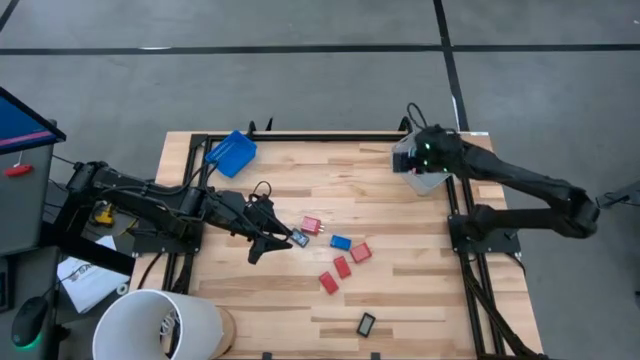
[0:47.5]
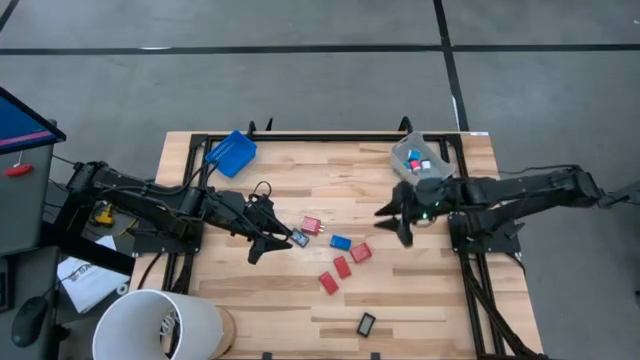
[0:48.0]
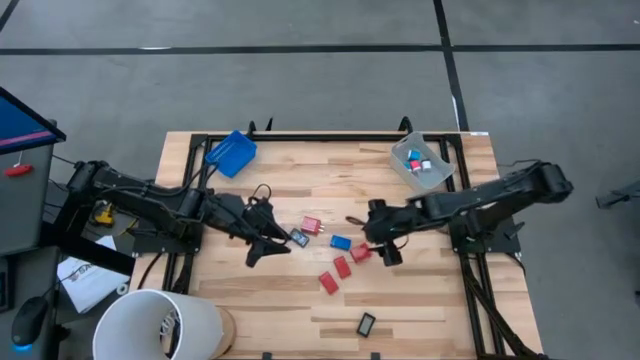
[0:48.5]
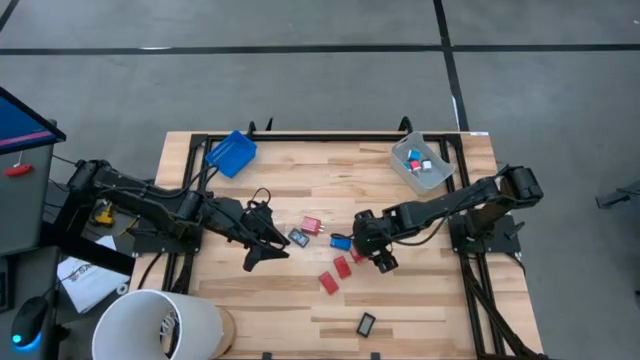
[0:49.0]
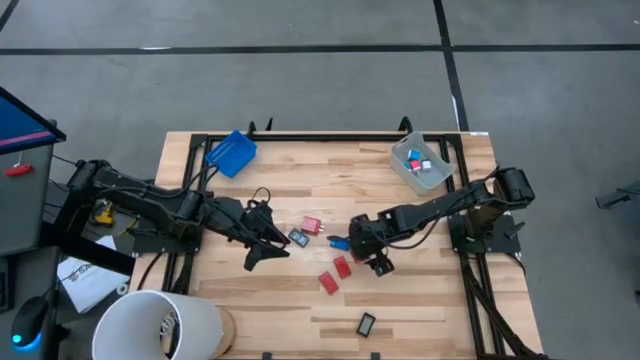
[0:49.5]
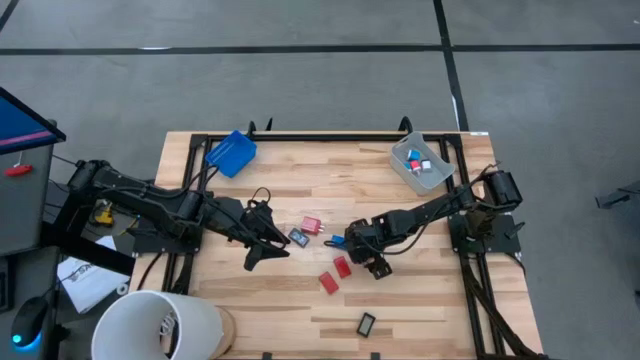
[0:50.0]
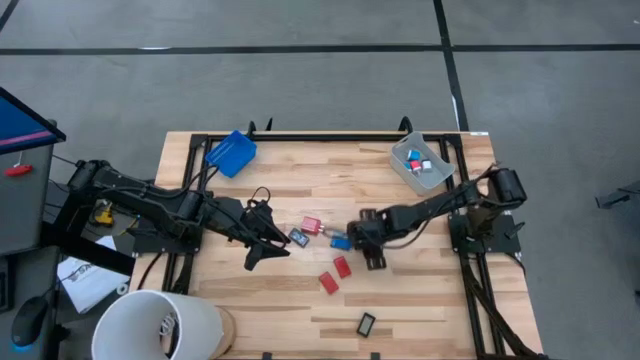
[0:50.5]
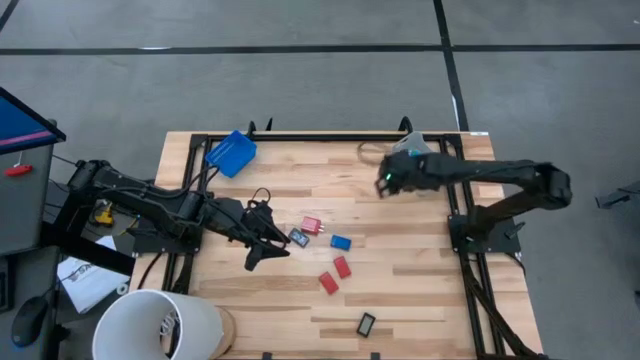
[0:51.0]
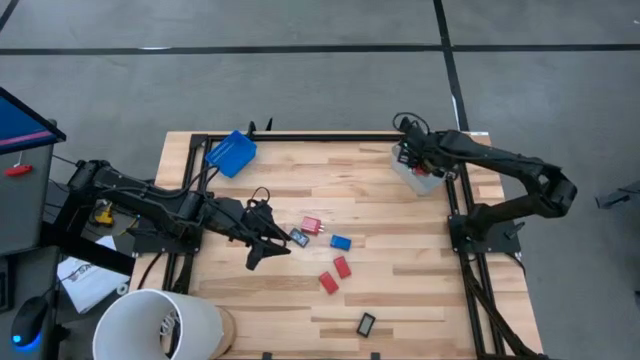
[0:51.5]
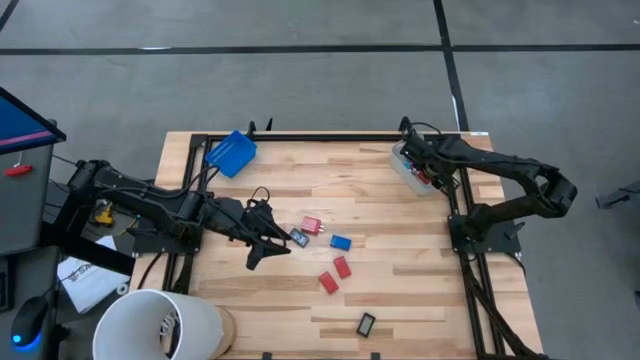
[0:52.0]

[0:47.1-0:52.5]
Task: Pick & Place Office items
Put the right red charger into the gray bin

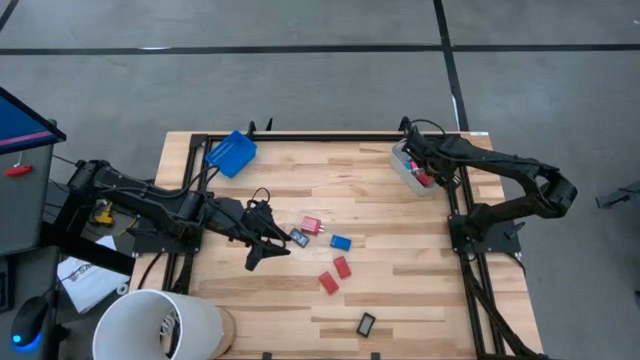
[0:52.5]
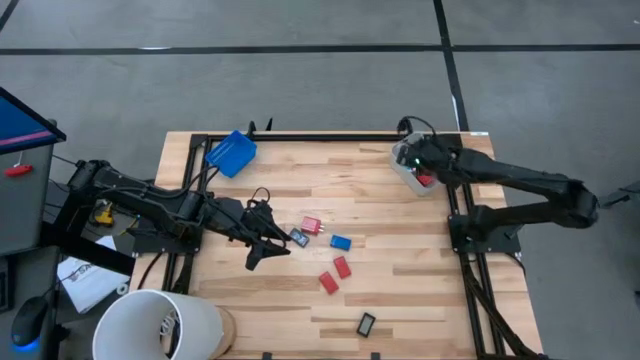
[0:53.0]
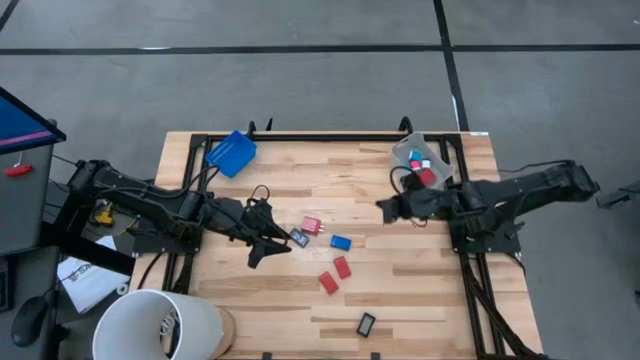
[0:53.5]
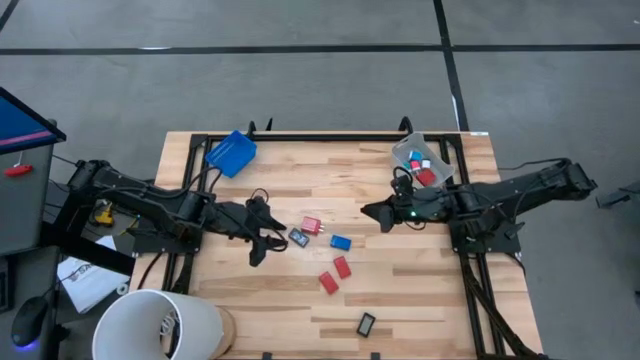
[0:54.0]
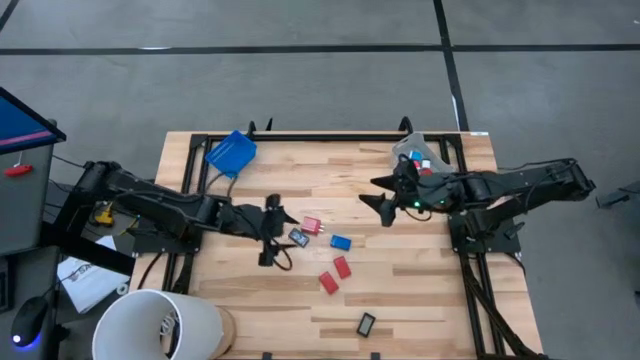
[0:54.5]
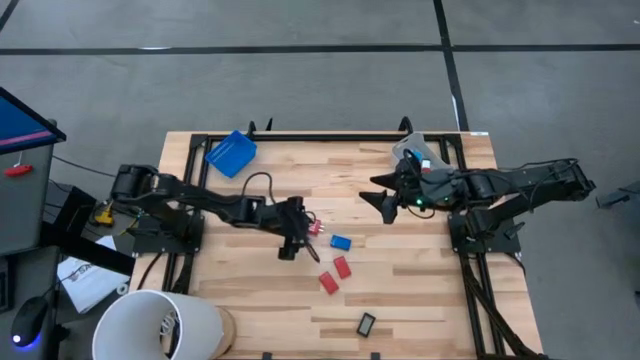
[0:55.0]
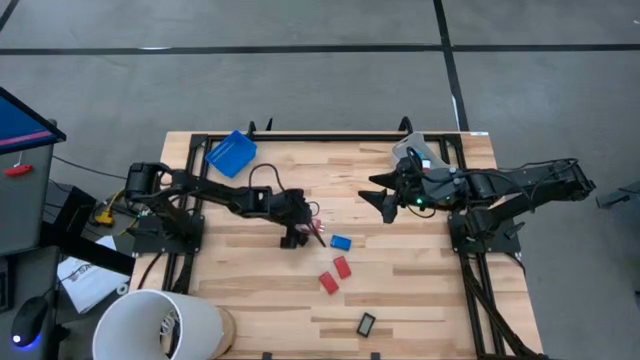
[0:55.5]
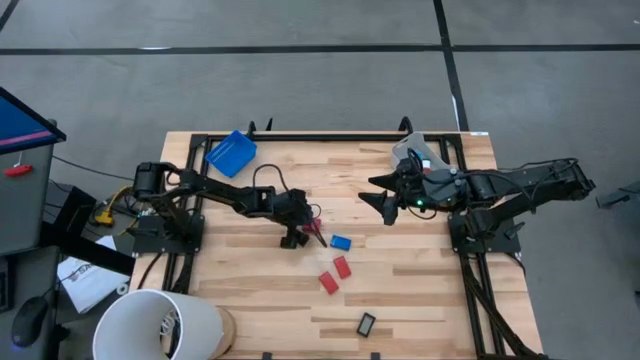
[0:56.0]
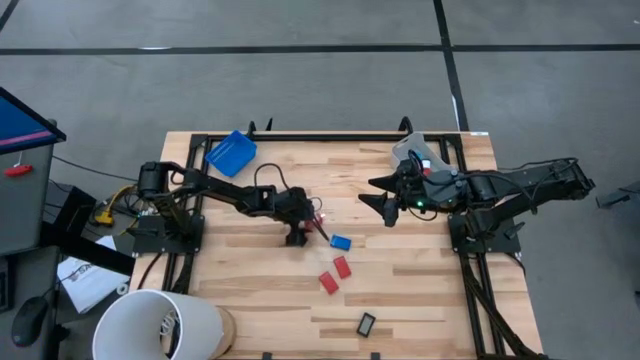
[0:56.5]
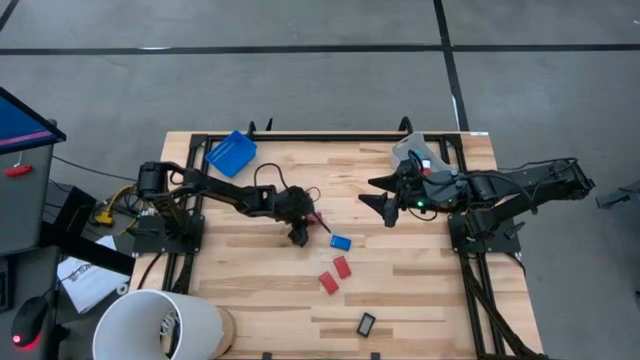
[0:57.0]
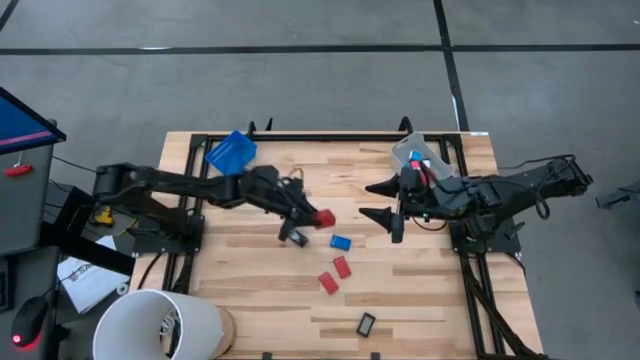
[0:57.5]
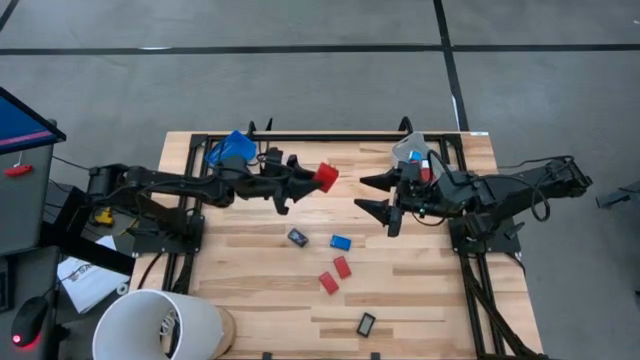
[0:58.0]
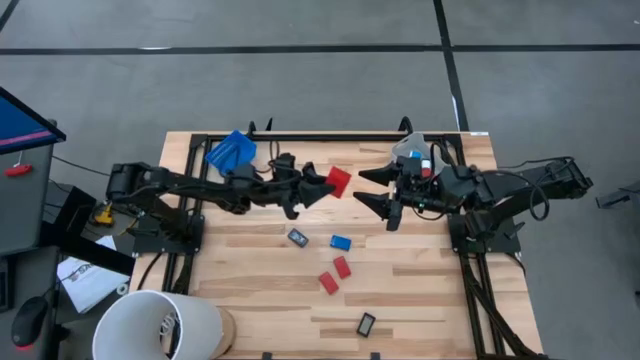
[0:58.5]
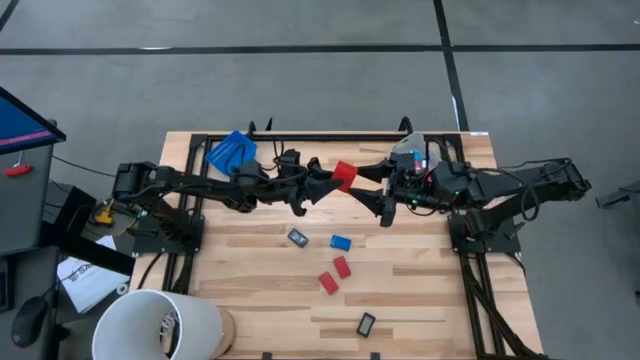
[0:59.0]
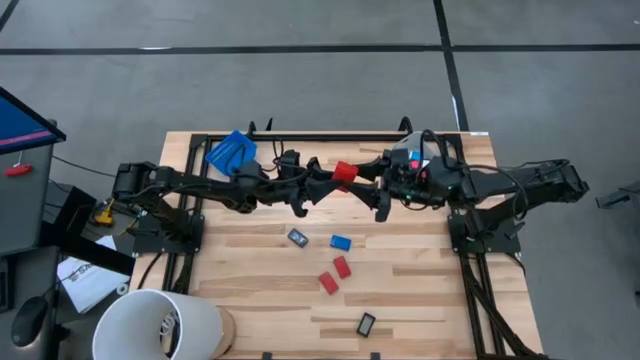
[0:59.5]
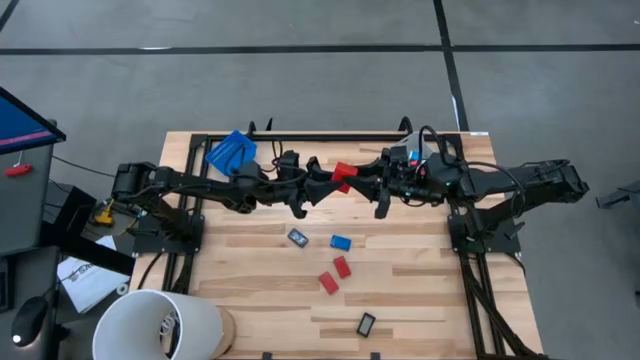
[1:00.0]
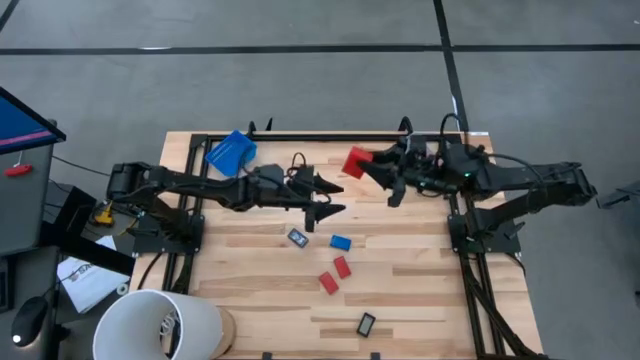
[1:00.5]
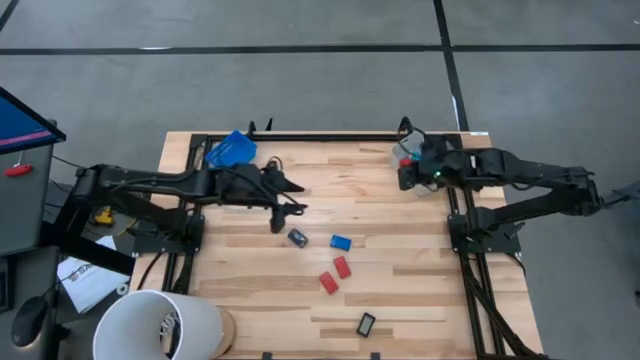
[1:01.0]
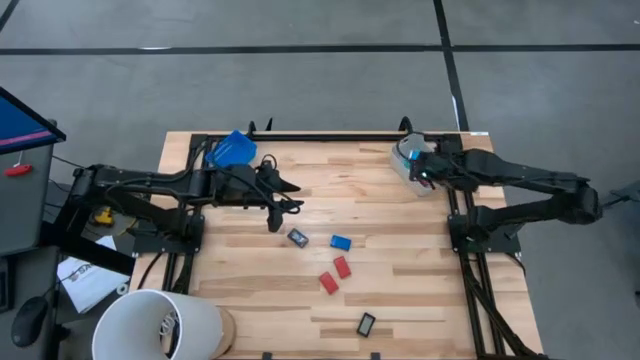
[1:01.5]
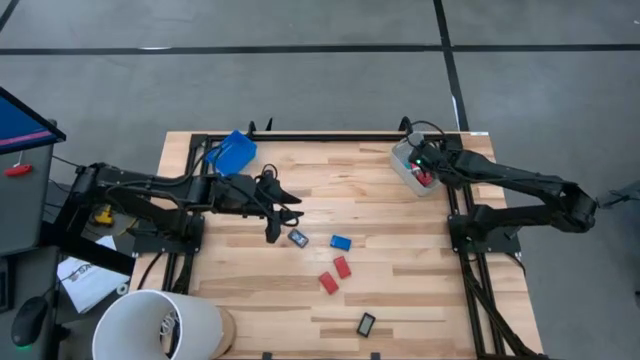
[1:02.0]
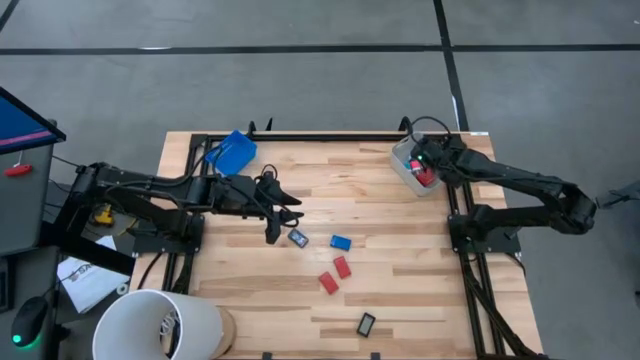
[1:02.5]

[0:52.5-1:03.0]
Put the red charger into the gray bin

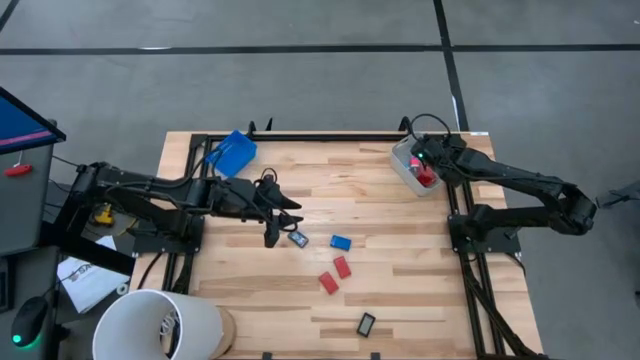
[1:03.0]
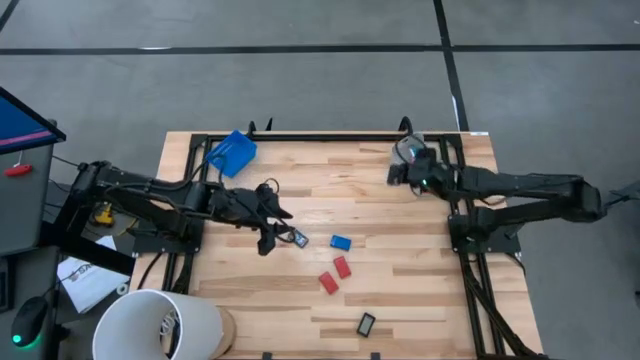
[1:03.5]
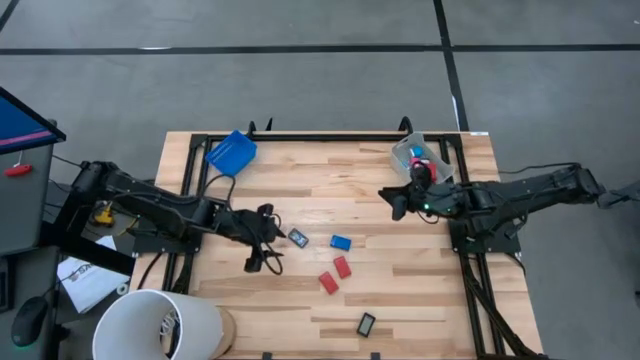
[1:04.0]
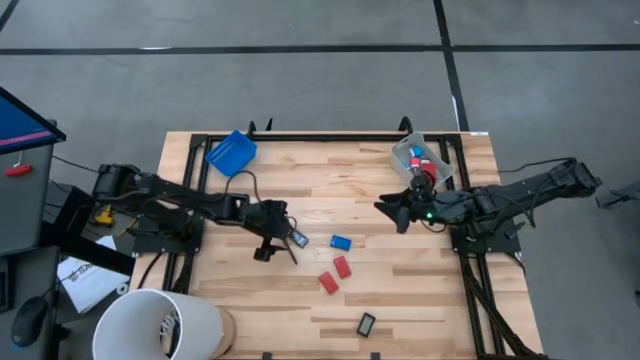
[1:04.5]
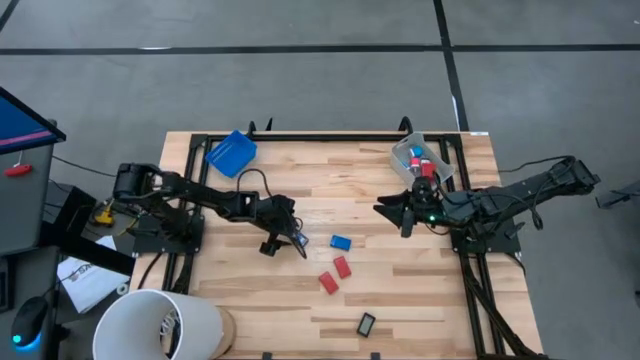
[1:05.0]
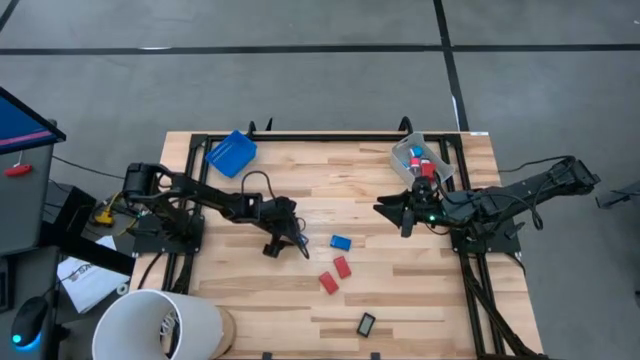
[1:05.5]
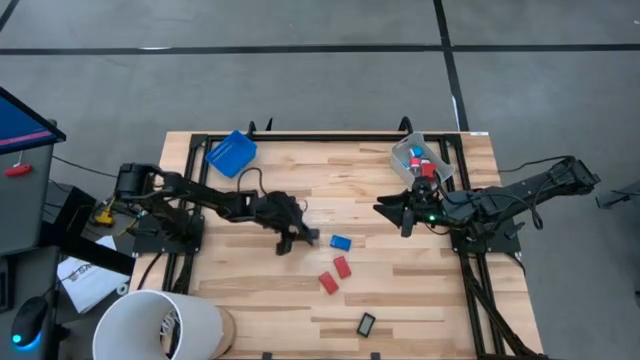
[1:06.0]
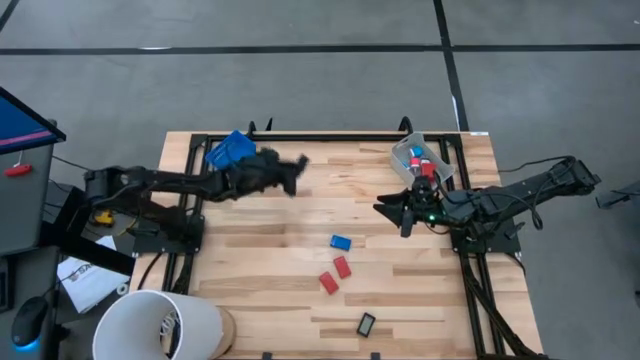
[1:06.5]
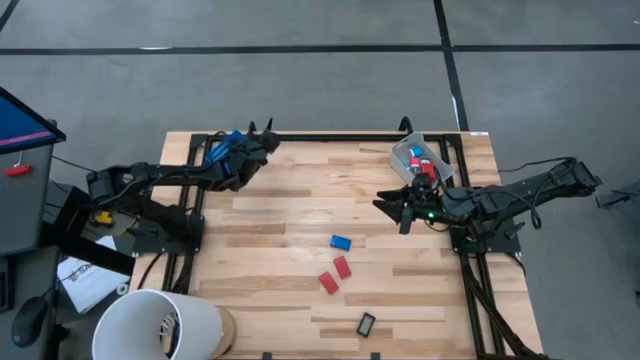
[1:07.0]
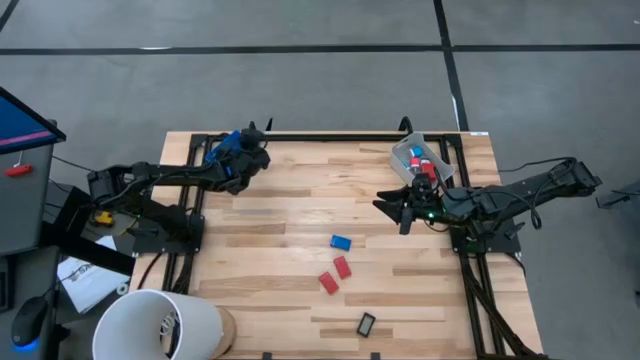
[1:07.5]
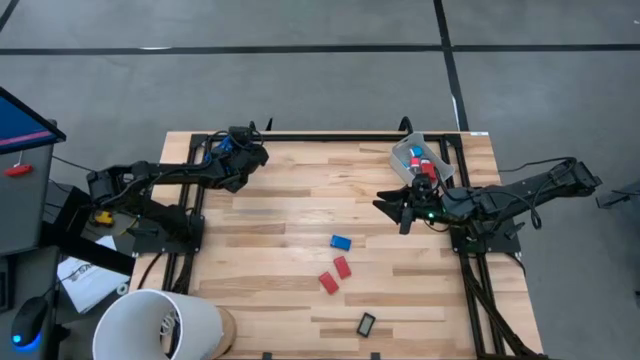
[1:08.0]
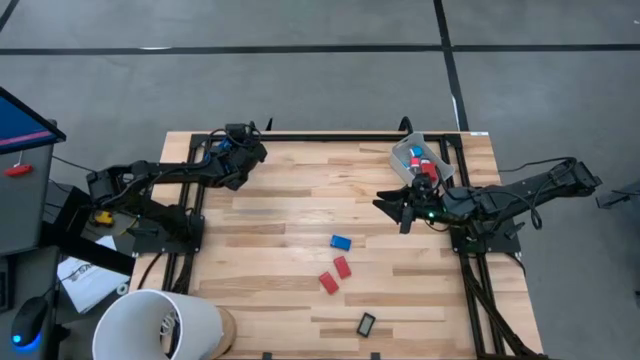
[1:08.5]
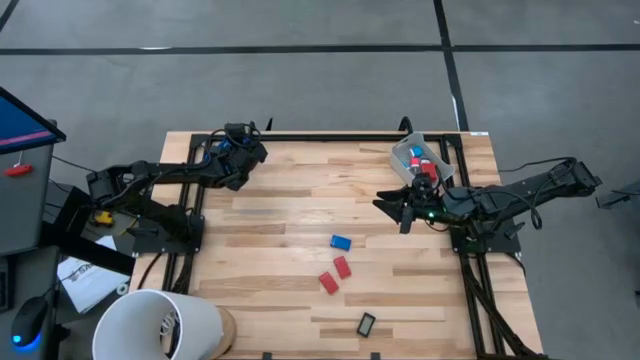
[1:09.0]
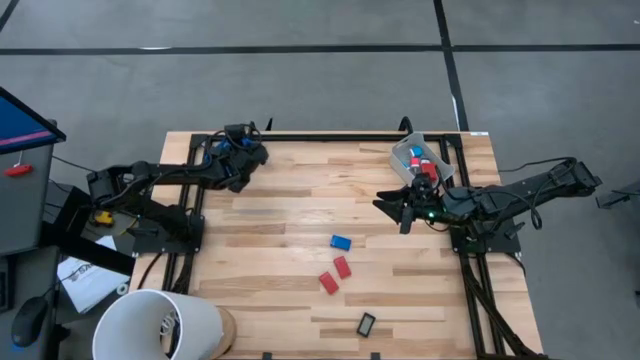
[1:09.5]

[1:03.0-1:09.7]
Put the top black clock into the blue bin
